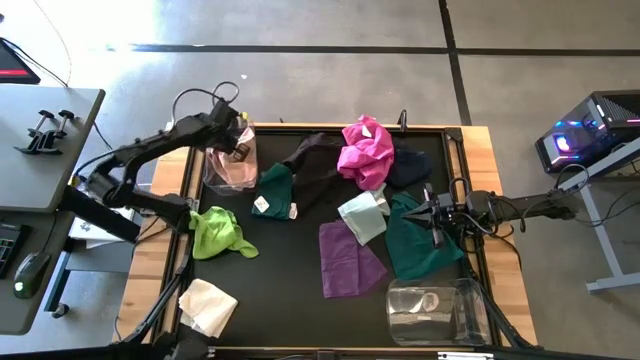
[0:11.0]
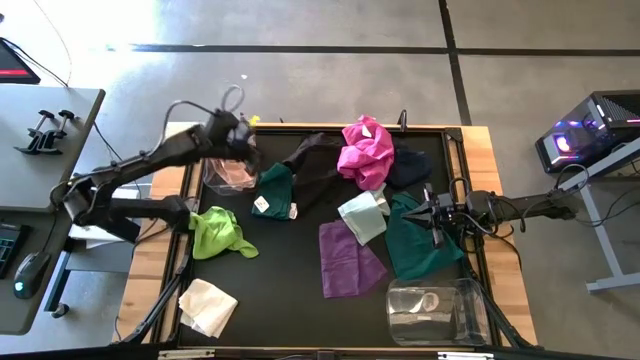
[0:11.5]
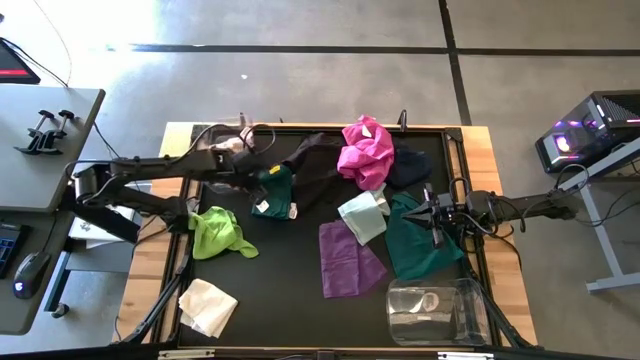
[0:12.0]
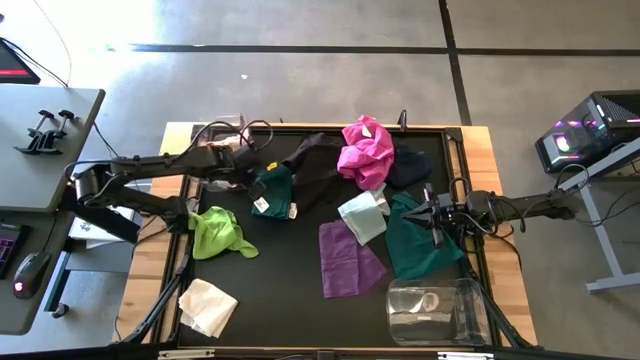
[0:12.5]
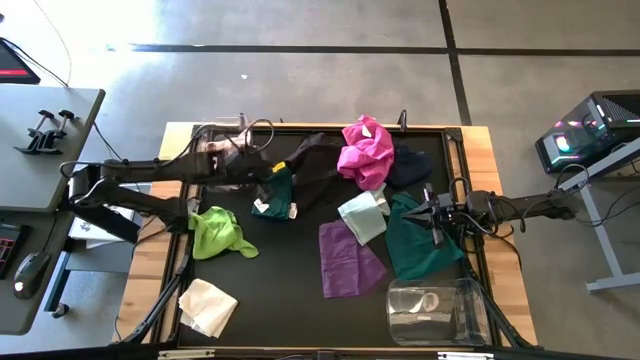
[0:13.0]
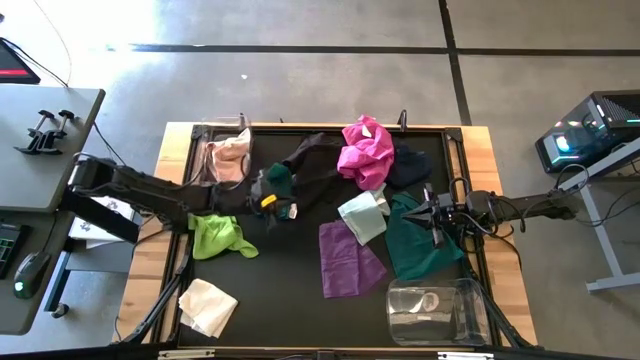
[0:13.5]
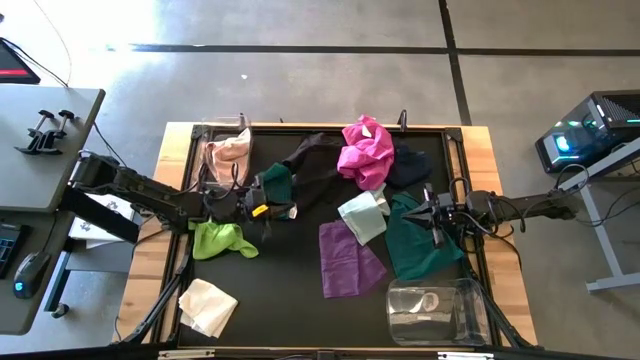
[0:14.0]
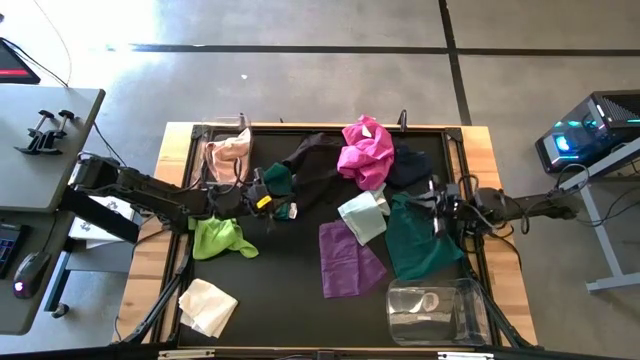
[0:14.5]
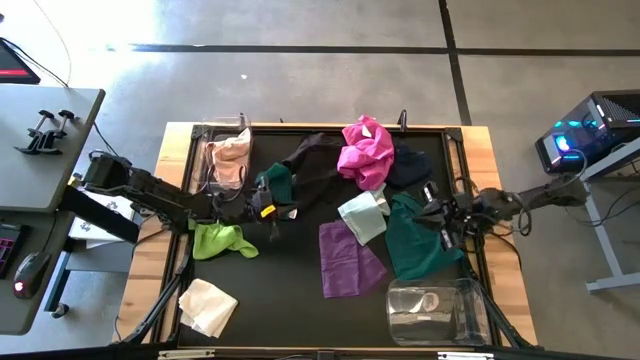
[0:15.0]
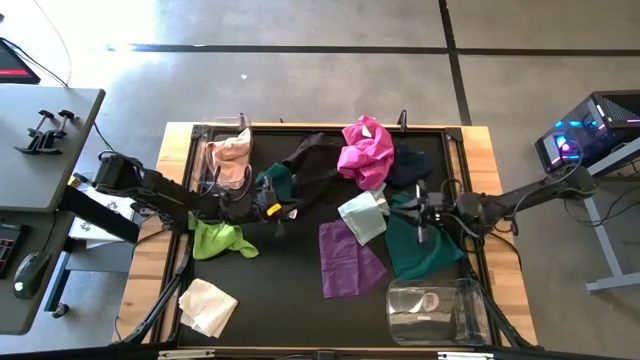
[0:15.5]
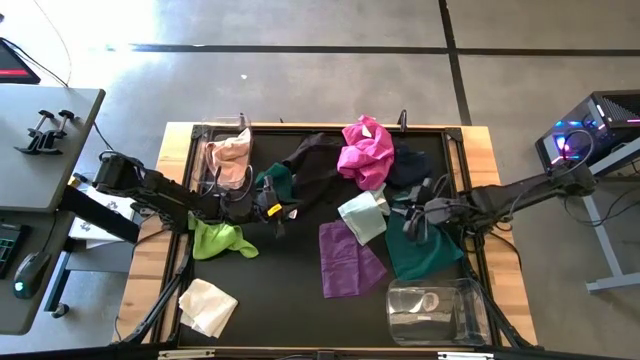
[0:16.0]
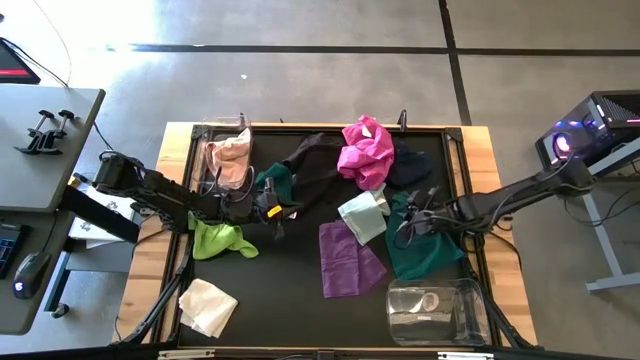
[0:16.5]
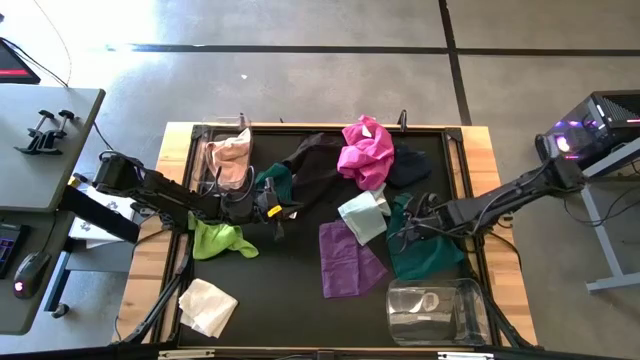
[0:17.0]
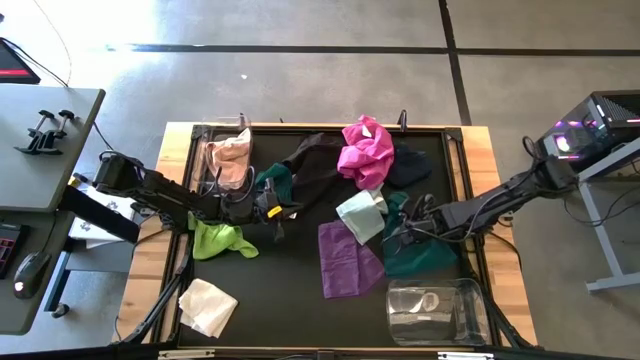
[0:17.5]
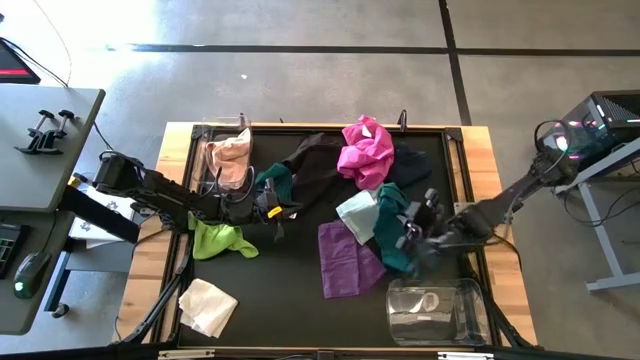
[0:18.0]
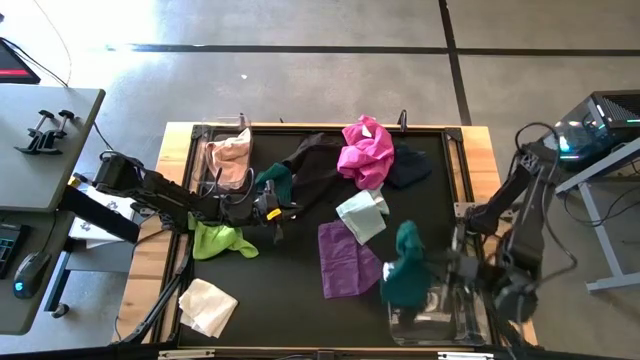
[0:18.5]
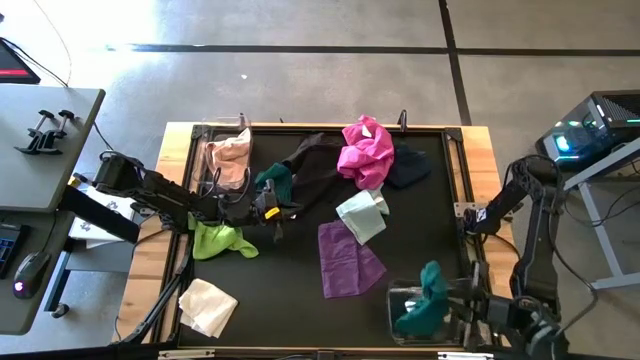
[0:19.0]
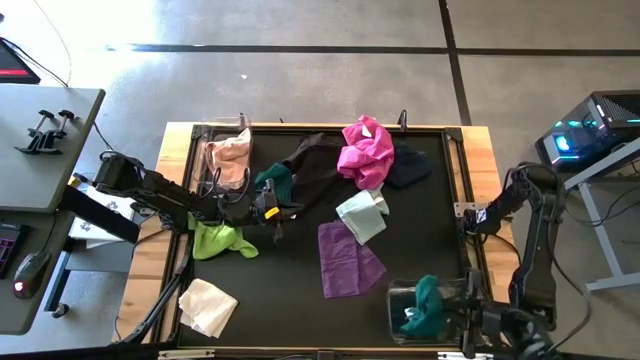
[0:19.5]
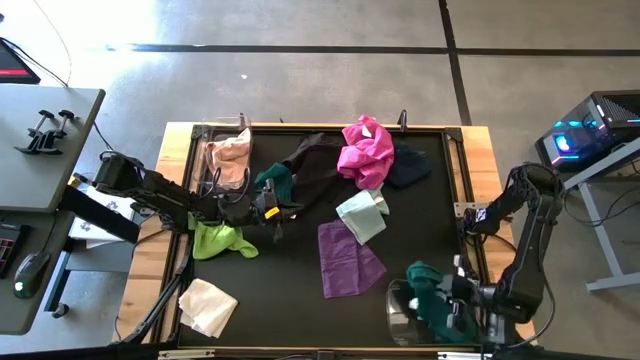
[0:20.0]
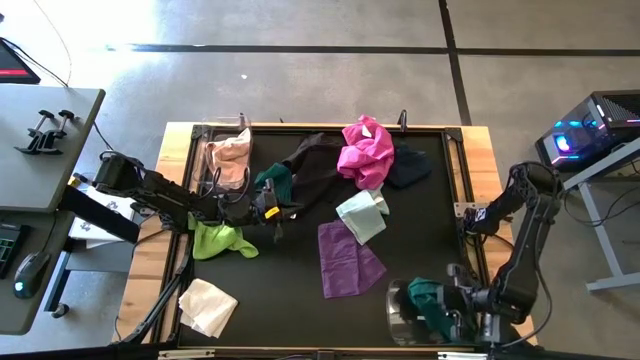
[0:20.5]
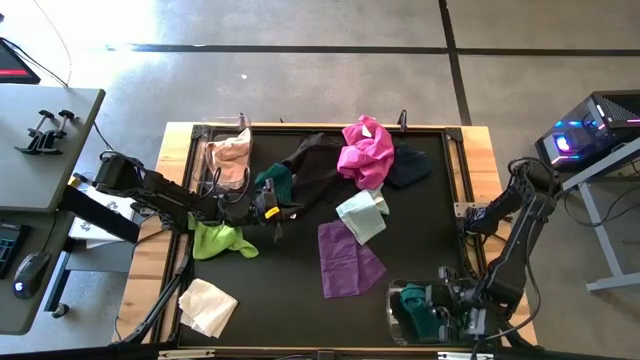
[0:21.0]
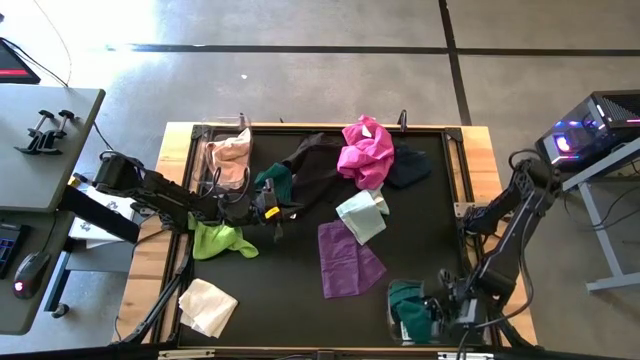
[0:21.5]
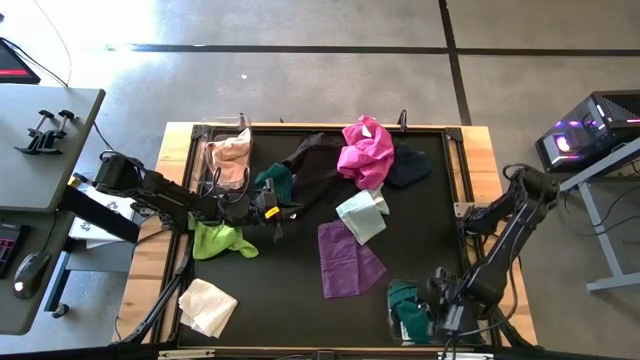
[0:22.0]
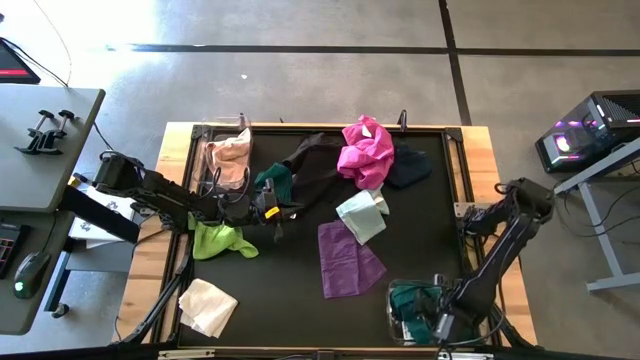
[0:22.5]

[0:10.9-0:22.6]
Task: Sort towels by color in basket
Put the right green towel into the bottom transparent bin

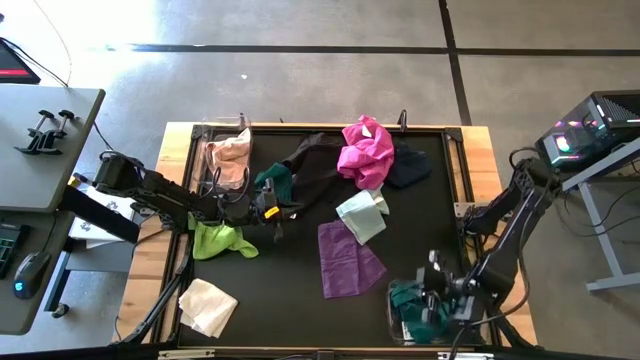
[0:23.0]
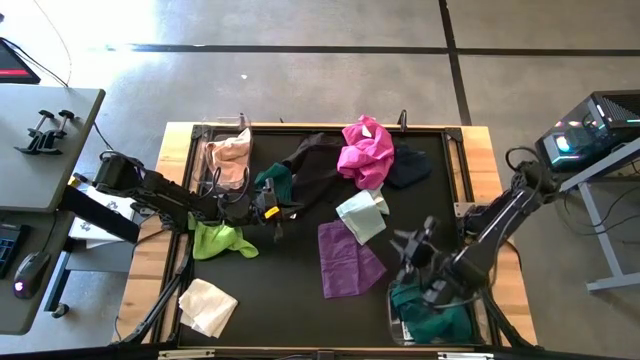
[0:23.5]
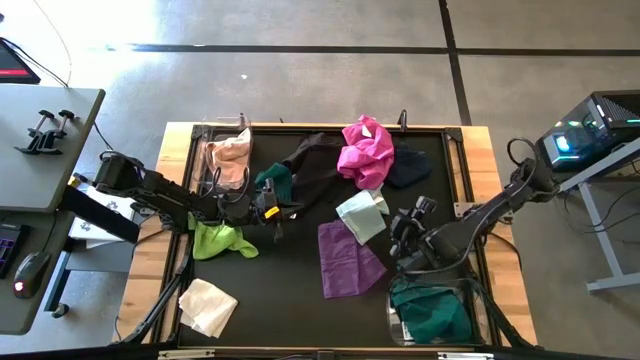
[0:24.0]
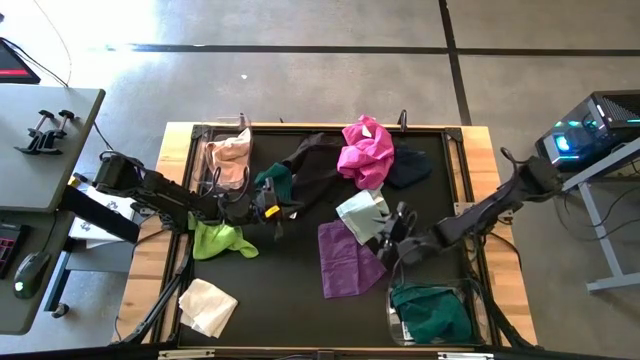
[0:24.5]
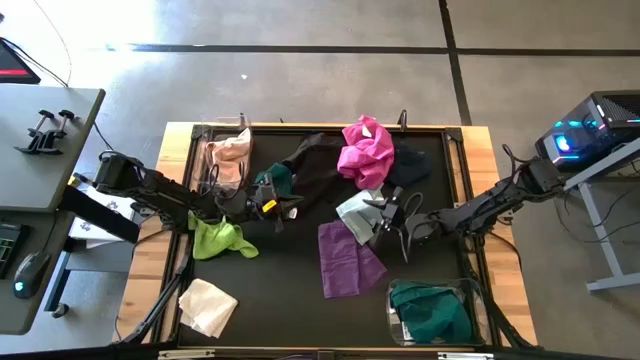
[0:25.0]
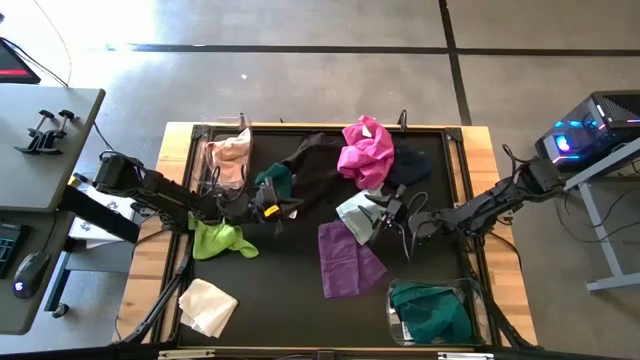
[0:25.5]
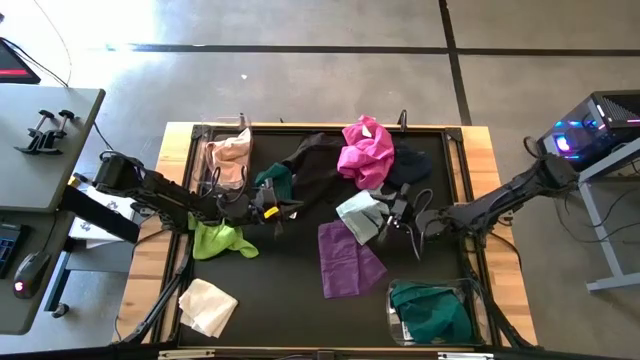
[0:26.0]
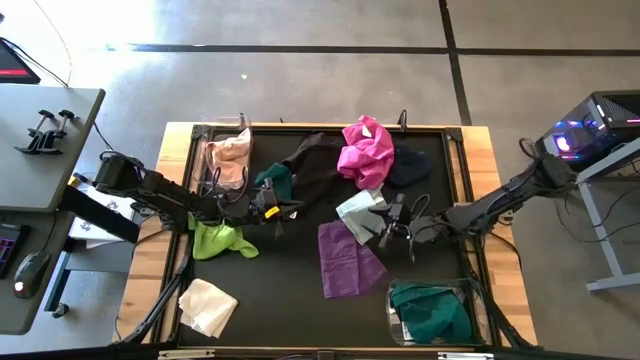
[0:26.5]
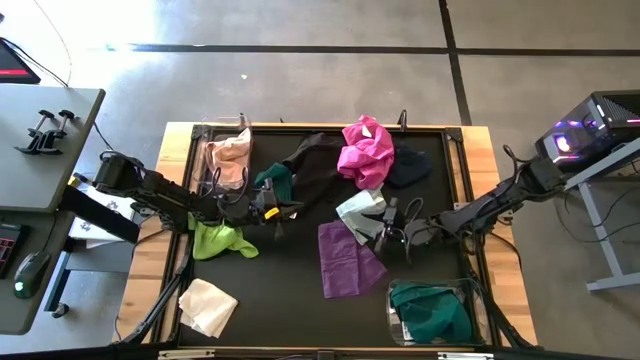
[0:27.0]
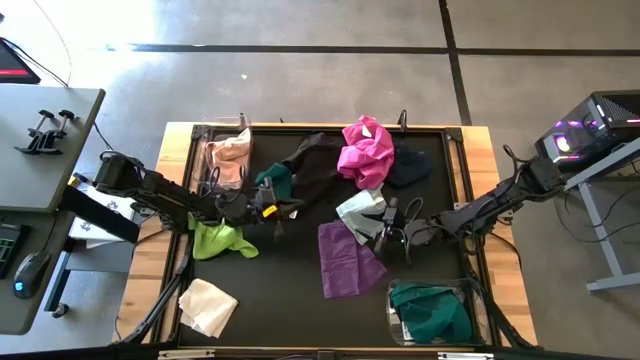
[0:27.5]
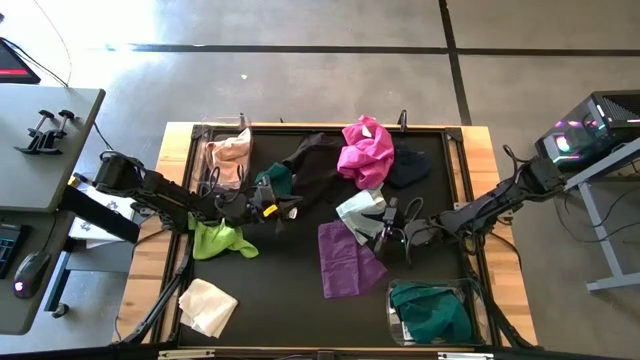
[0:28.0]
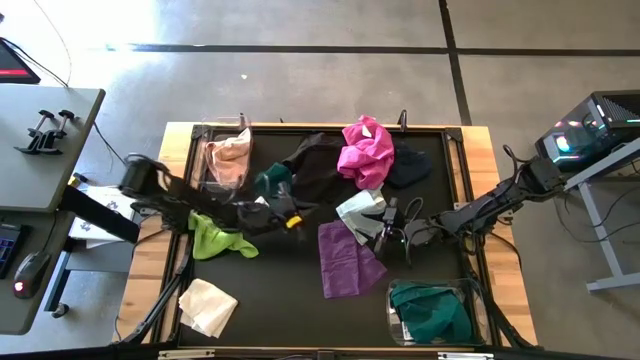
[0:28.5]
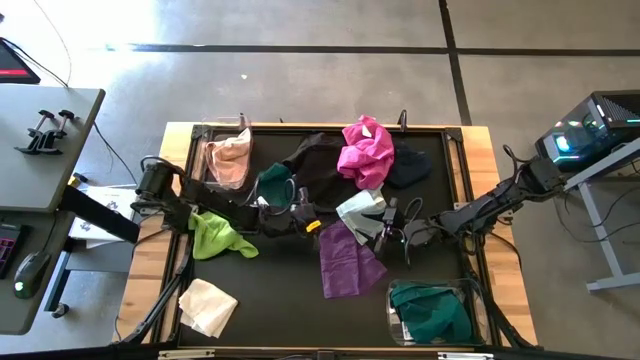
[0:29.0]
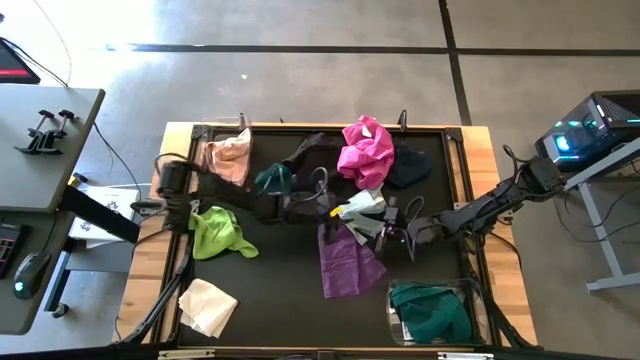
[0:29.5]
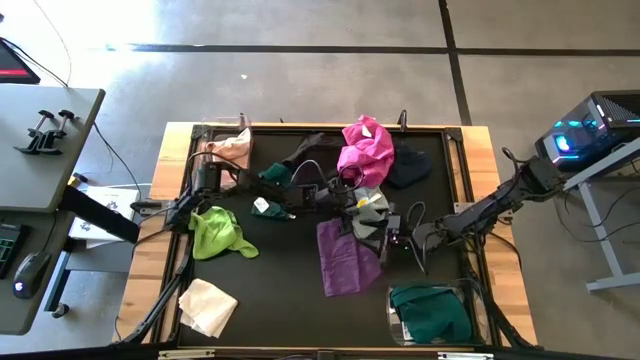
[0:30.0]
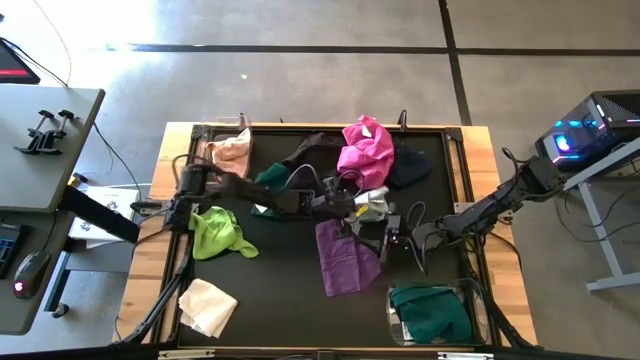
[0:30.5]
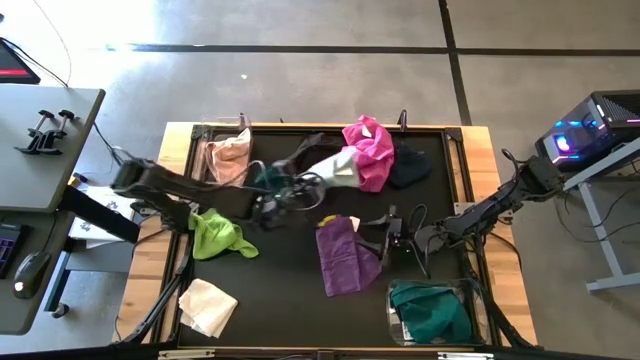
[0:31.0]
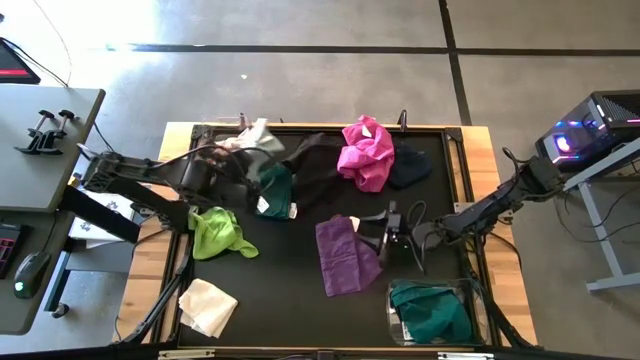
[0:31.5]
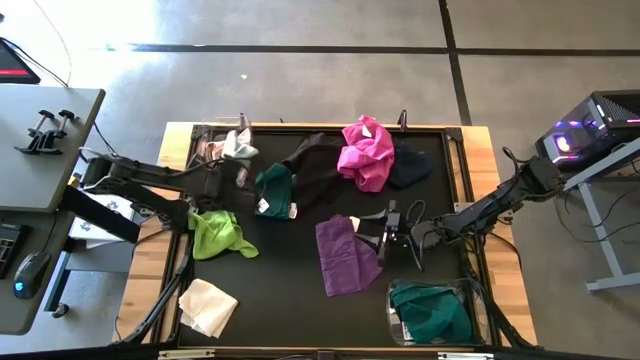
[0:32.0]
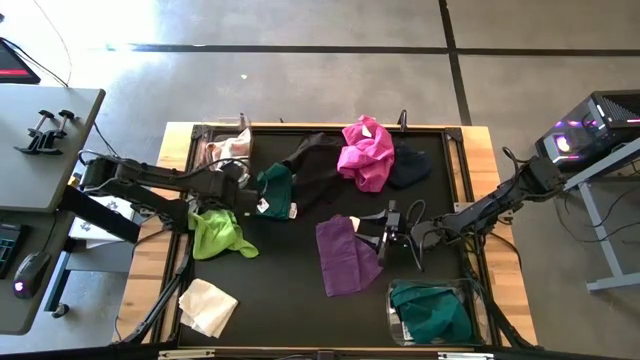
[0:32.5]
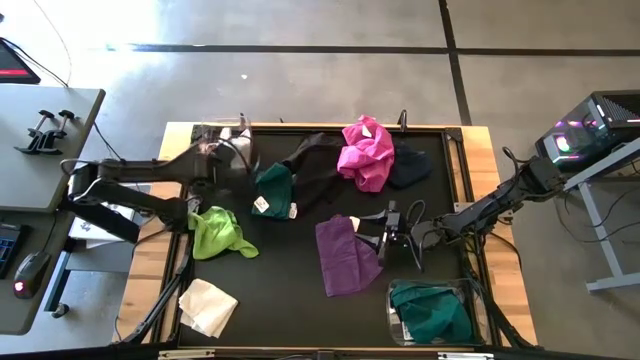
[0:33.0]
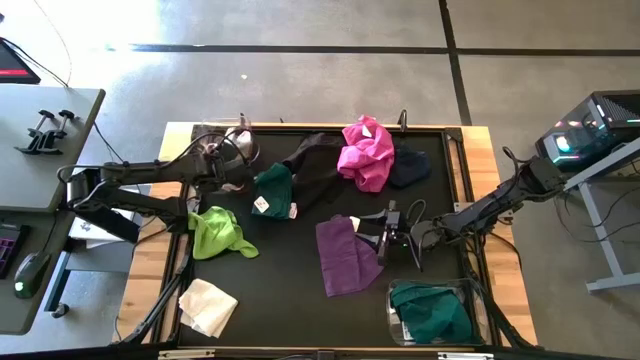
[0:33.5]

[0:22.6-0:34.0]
Put the right white towel into the top transparent bin
